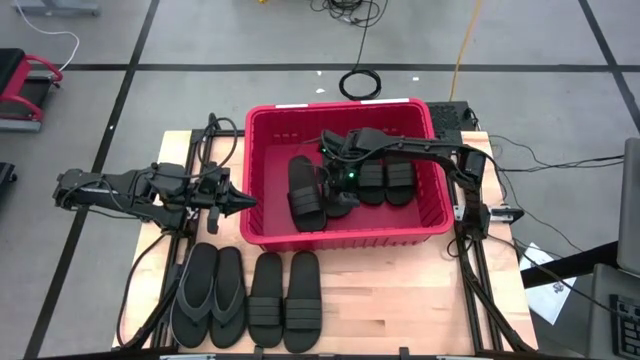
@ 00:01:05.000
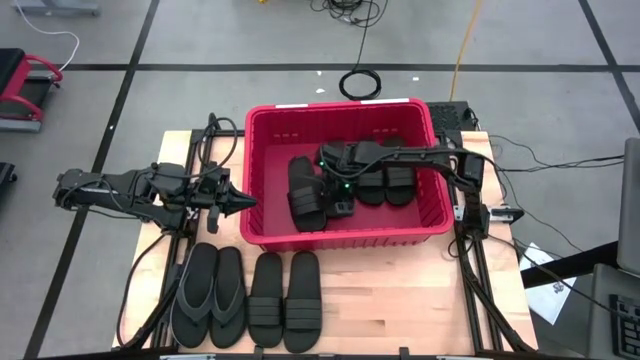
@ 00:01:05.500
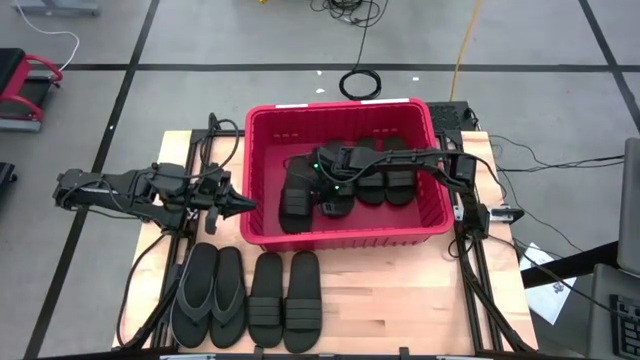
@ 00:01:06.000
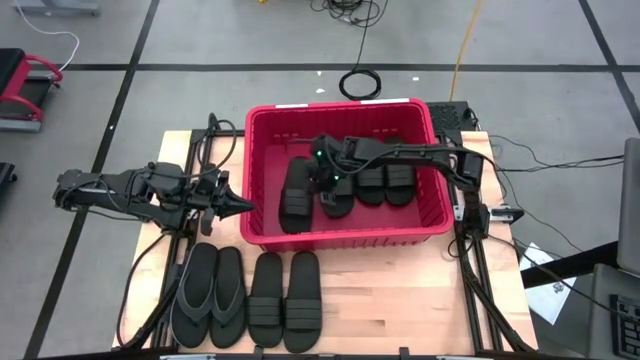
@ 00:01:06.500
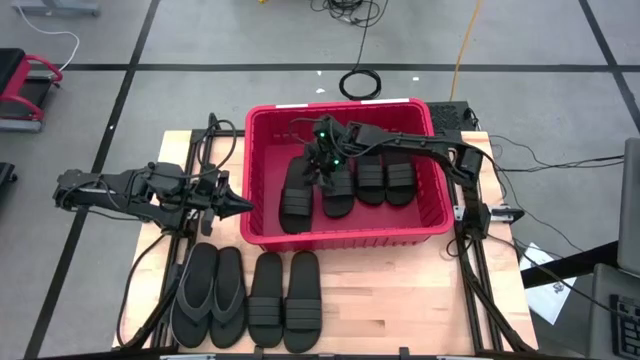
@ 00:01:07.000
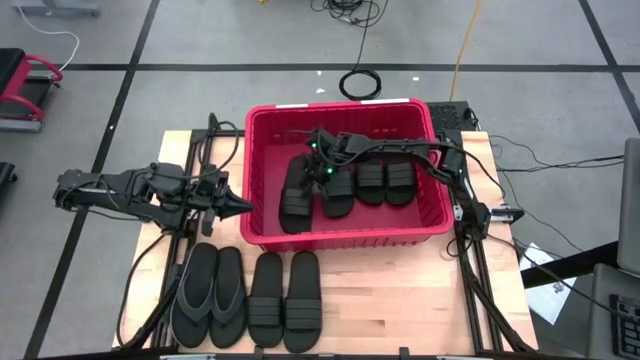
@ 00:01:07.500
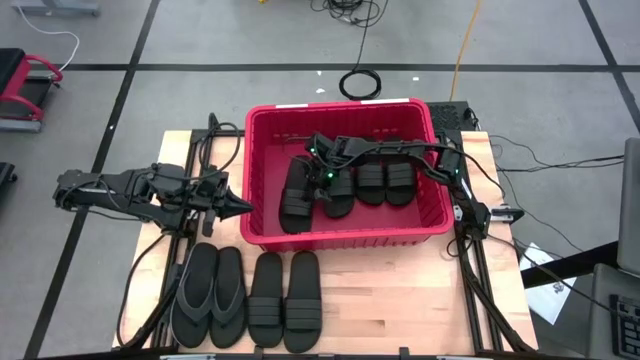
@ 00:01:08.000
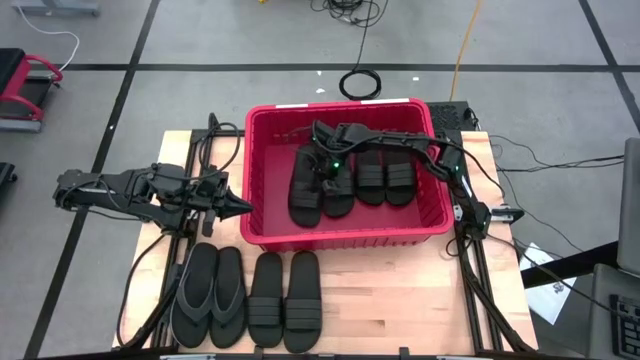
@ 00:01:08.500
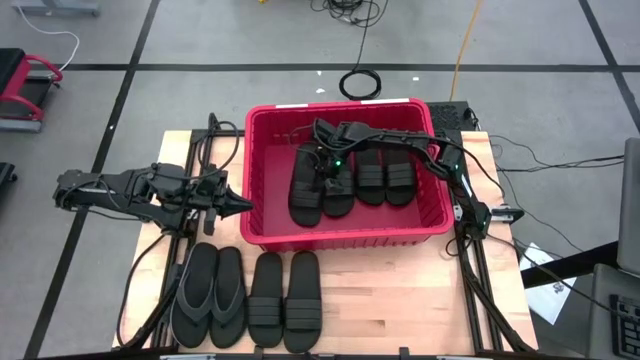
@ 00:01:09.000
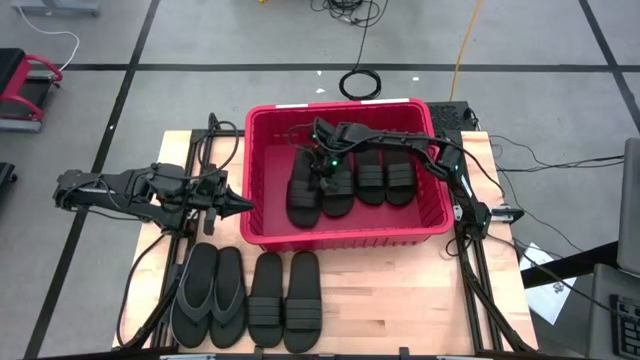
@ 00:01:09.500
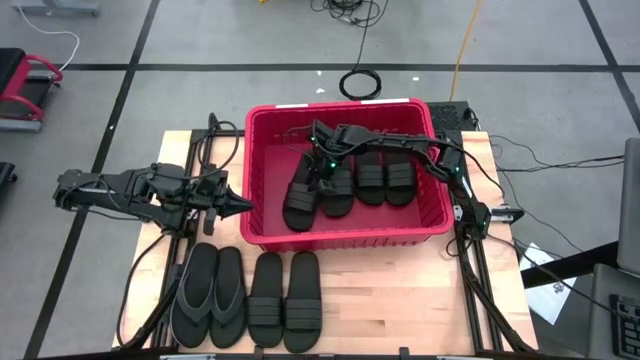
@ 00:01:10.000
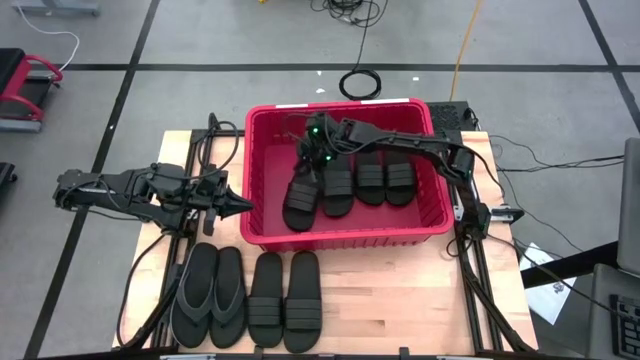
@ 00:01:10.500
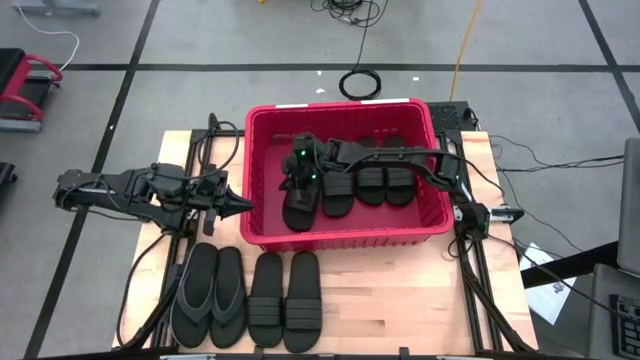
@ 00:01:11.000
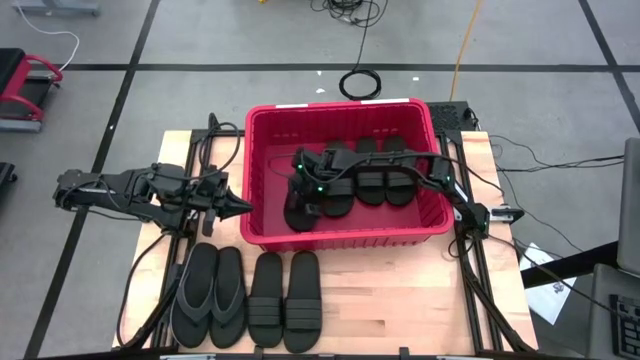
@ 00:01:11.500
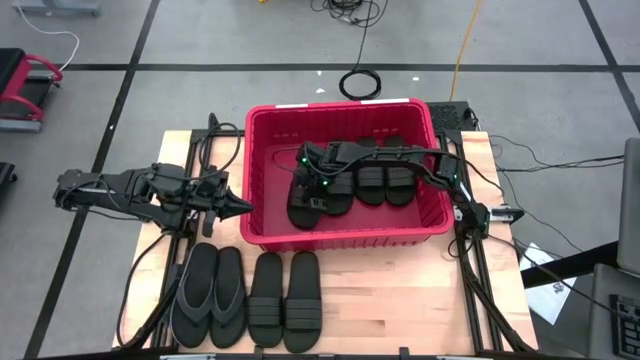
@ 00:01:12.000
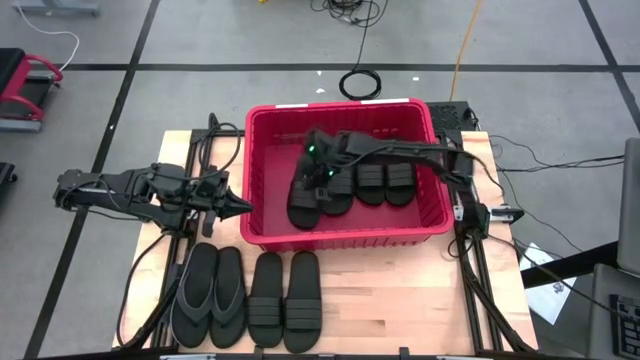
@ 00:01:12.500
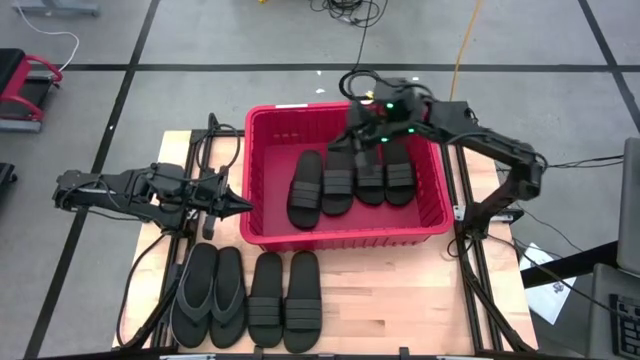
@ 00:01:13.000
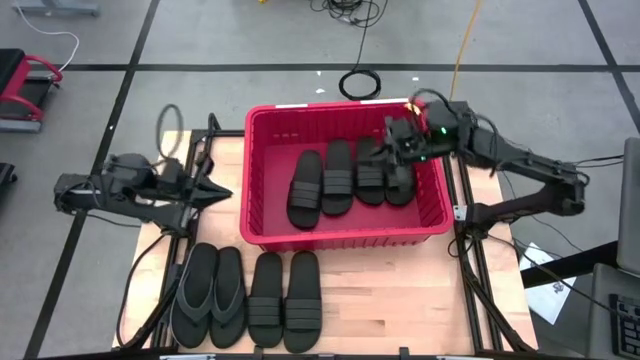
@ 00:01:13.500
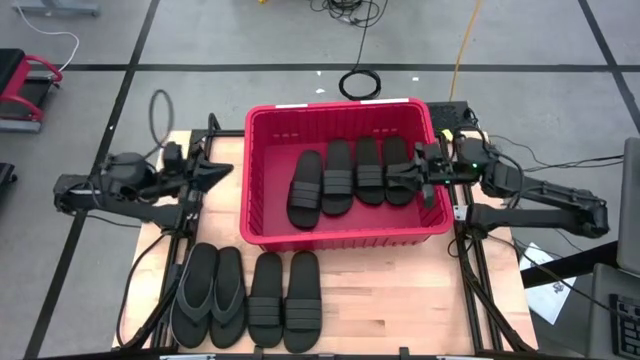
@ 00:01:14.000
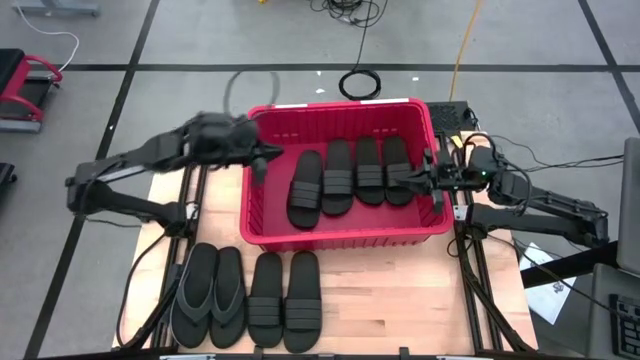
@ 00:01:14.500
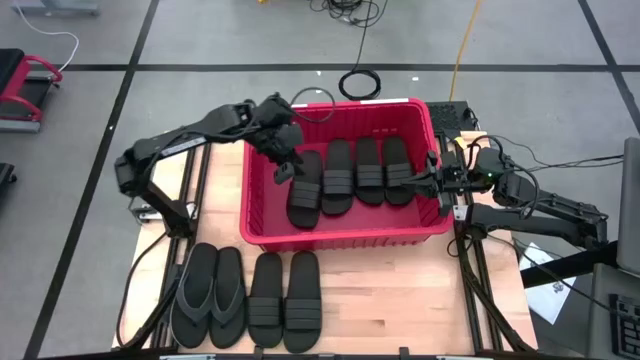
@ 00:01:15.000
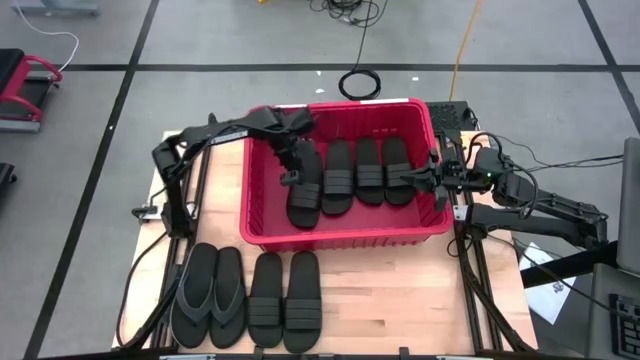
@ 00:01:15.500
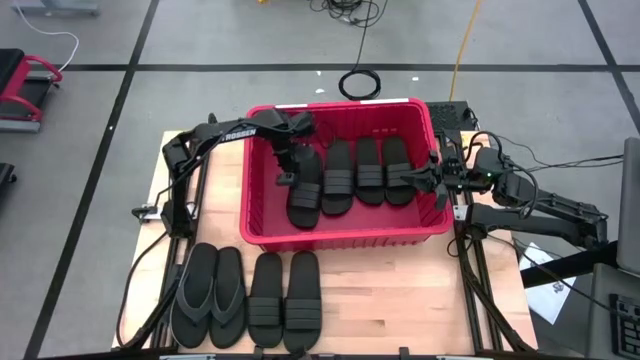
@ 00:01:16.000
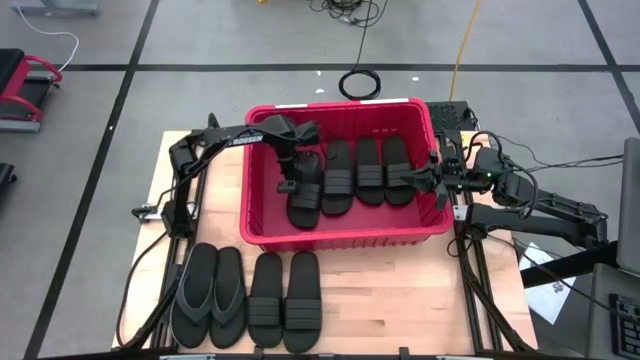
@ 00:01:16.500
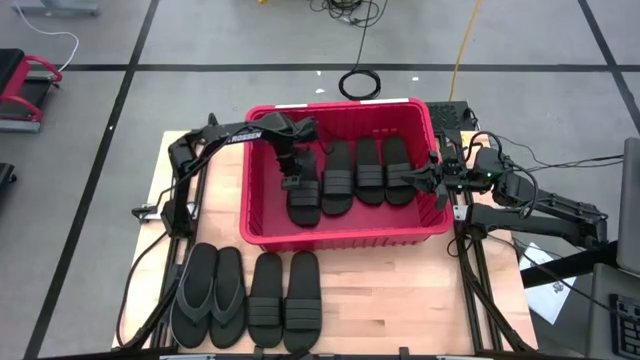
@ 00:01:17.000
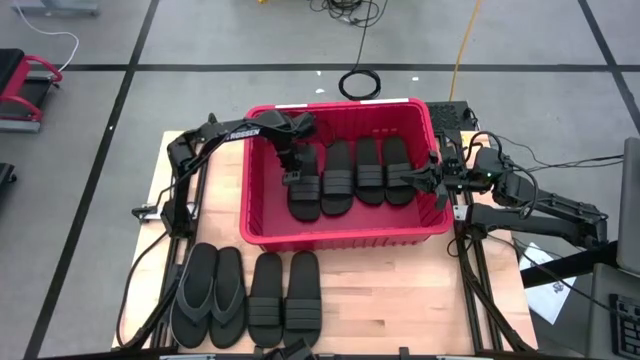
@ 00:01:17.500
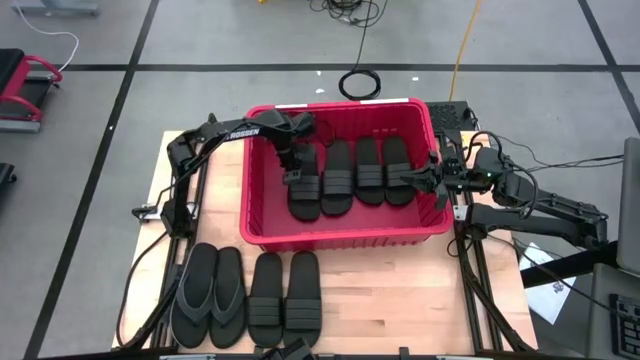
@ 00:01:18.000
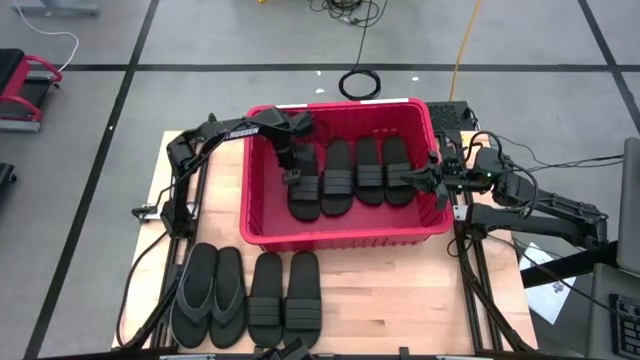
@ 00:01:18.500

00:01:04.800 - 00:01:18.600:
Task: Pick and place slides into bin
Put the black slide into the red bin

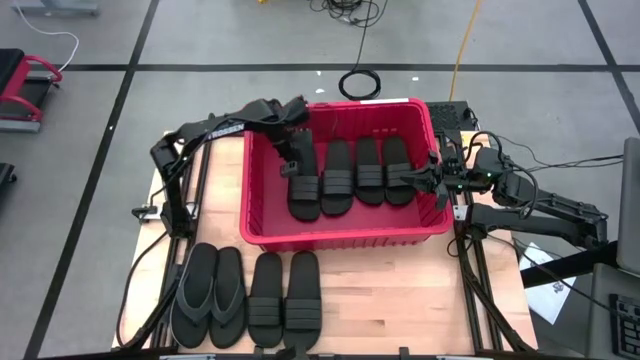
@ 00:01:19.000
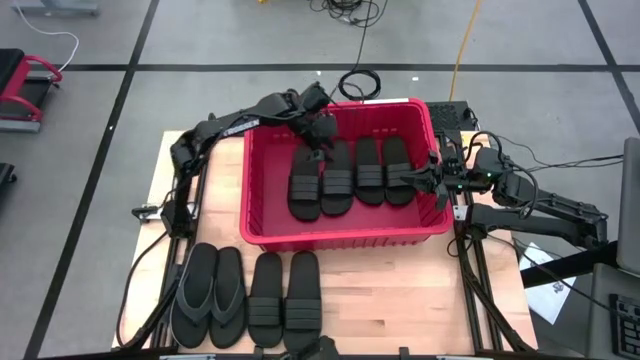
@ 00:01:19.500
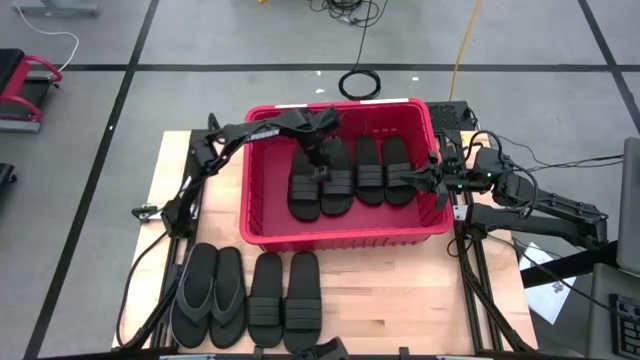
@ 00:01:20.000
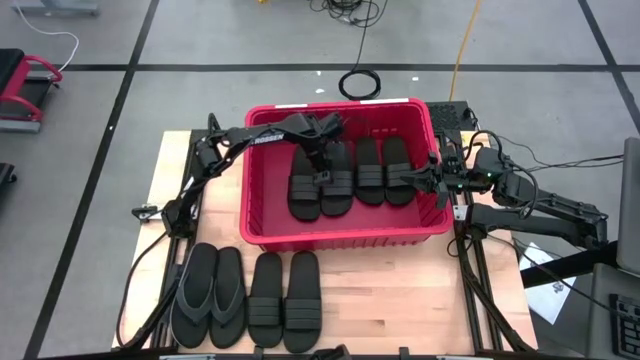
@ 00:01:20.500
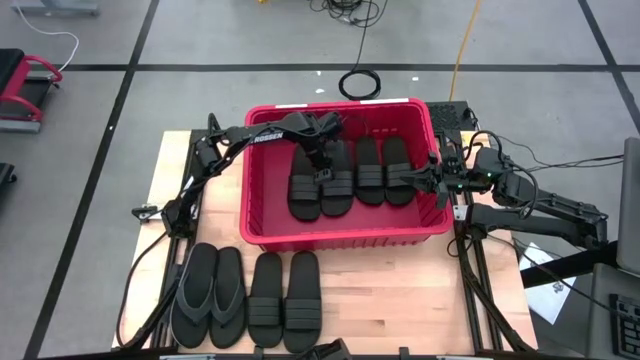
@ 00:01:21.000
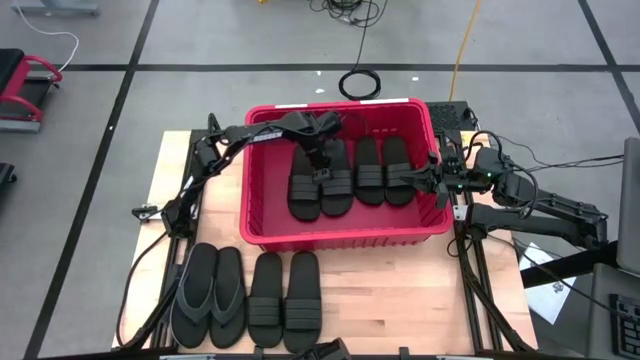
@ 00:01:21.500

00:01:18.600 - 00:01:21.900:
Adjust the black slide in the red bin

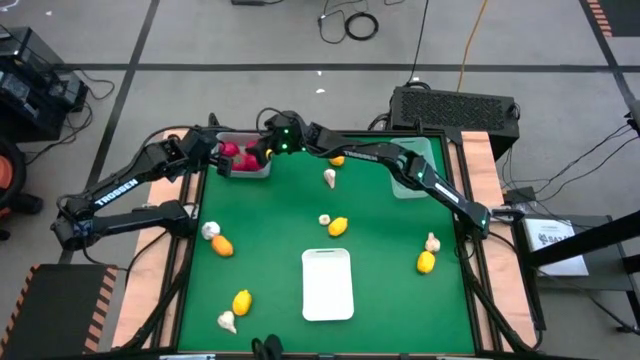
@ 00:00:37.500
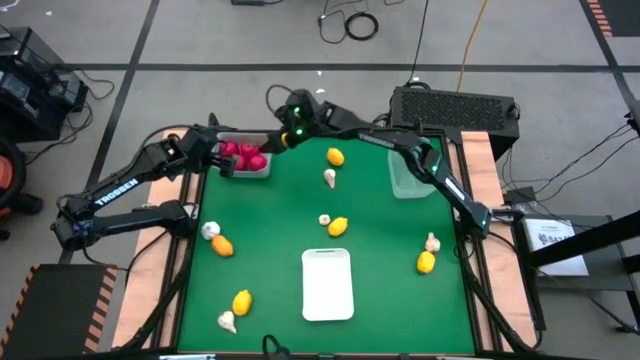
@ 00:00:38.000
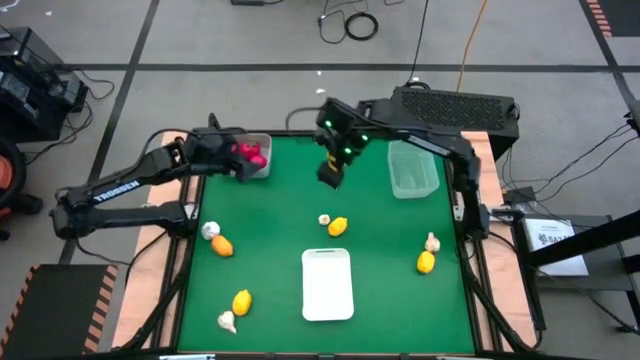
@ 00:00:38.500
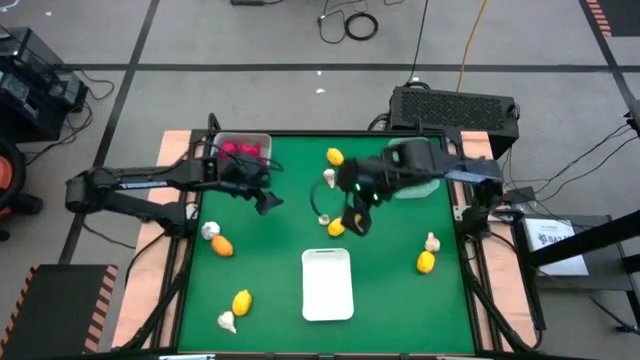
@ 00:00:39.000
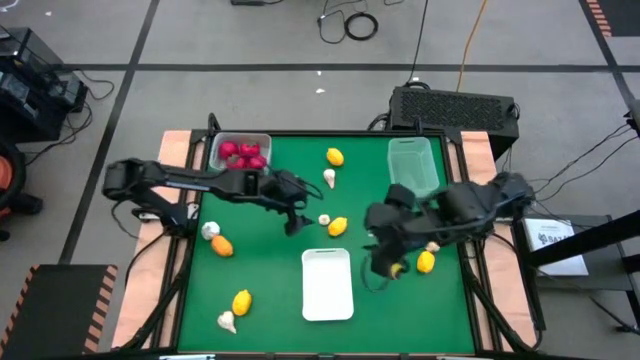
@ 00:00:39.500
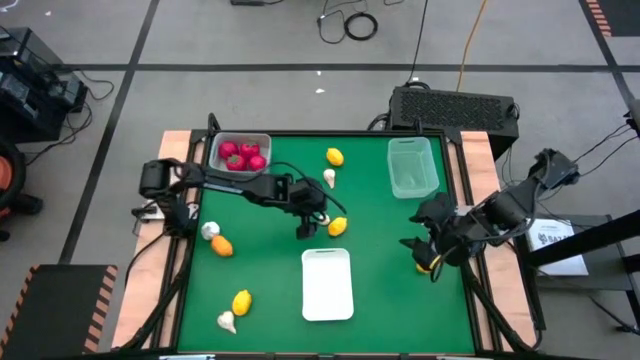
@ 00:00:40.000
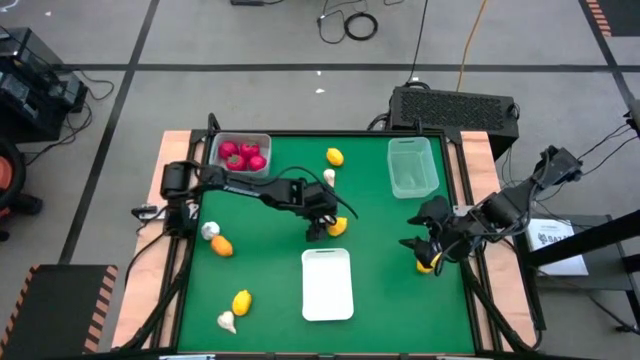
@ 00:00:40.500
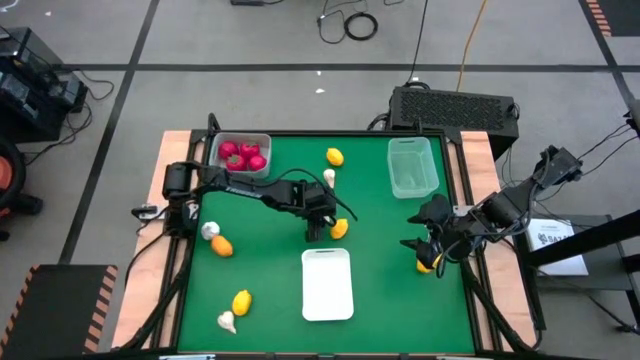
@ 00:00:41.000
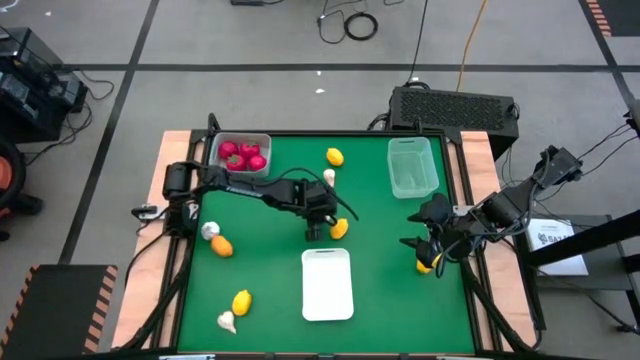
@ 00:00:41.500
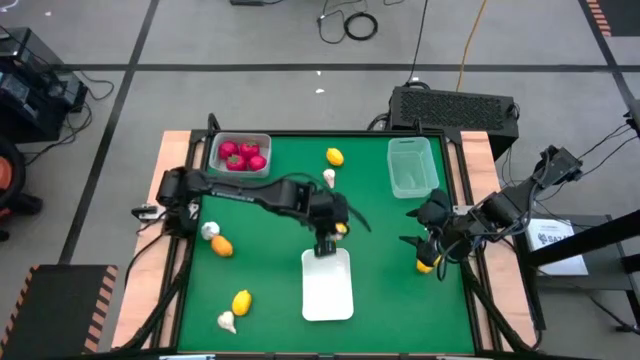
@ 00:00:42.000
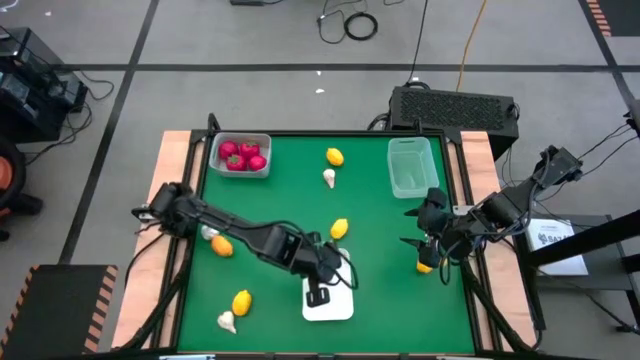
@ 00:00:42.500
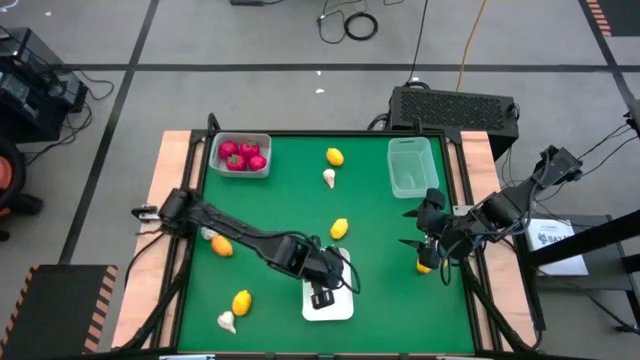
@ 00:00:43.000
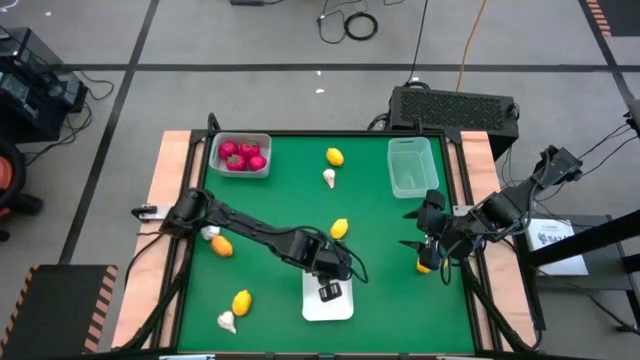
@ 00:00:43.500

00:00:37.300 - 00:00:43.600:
Task: Sort produce into baskets
Put the center garlic into the white bin
